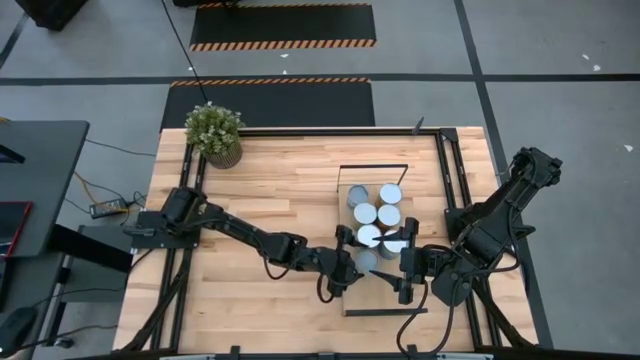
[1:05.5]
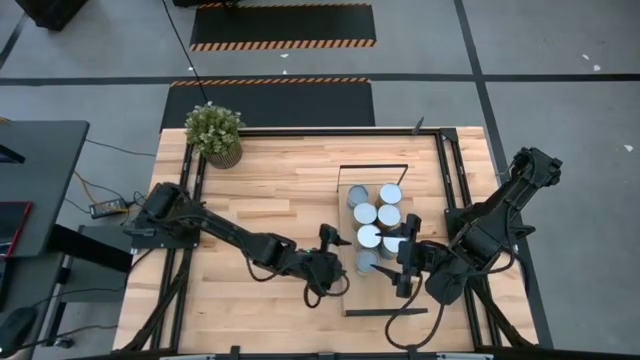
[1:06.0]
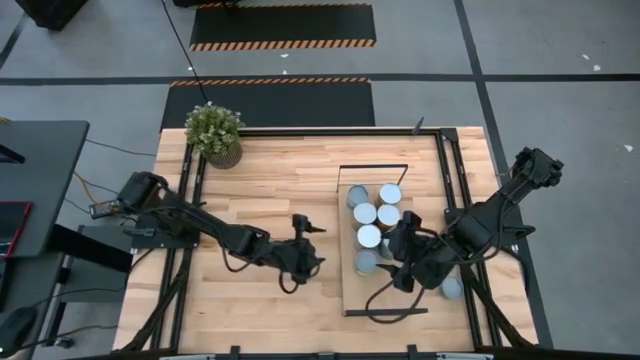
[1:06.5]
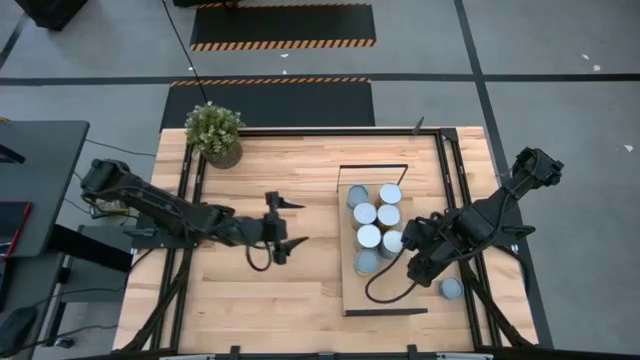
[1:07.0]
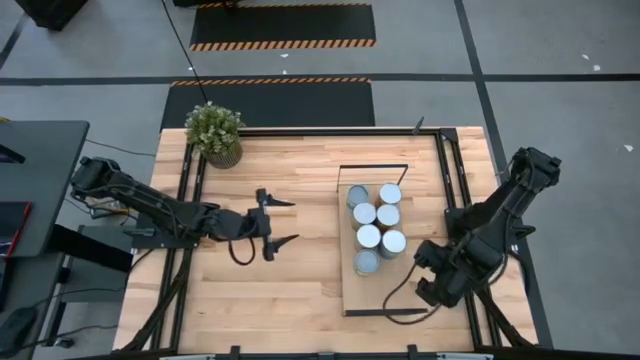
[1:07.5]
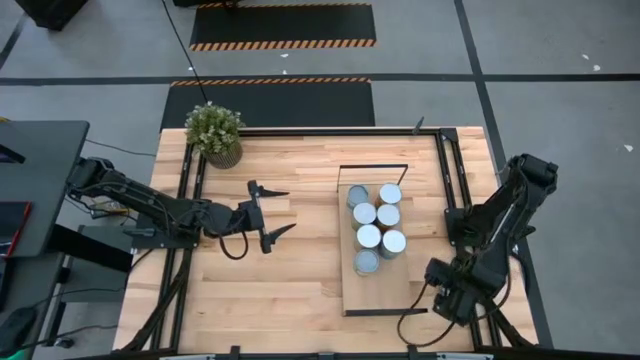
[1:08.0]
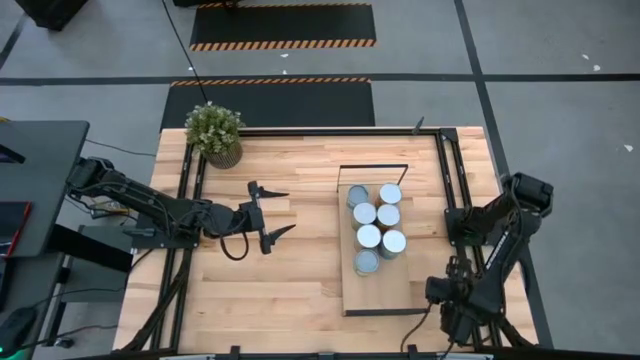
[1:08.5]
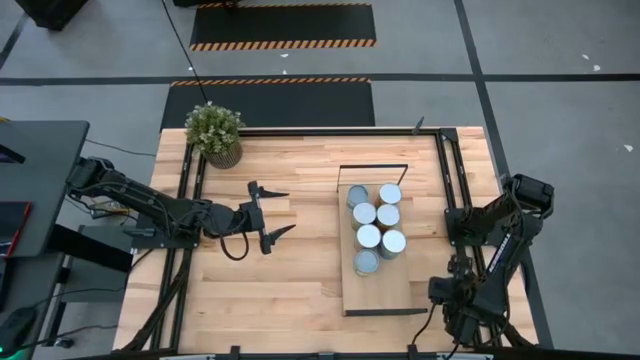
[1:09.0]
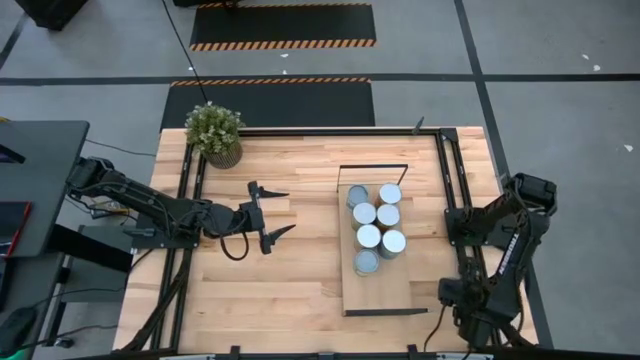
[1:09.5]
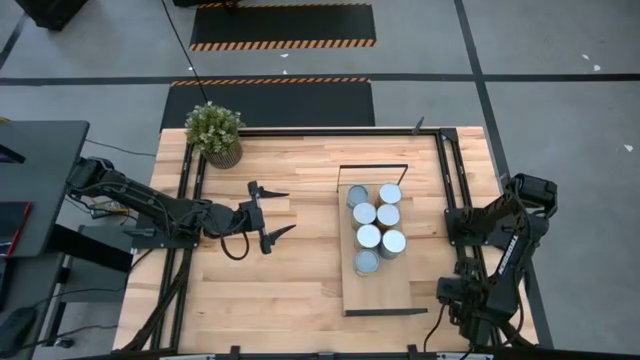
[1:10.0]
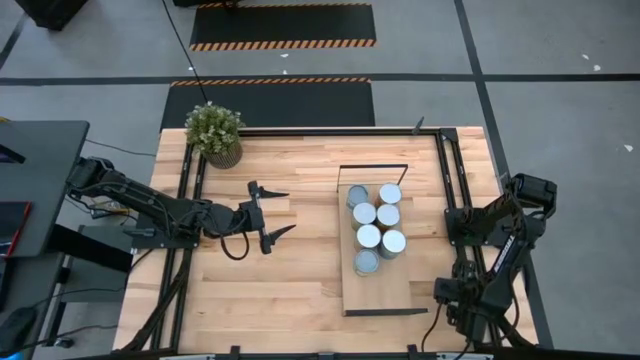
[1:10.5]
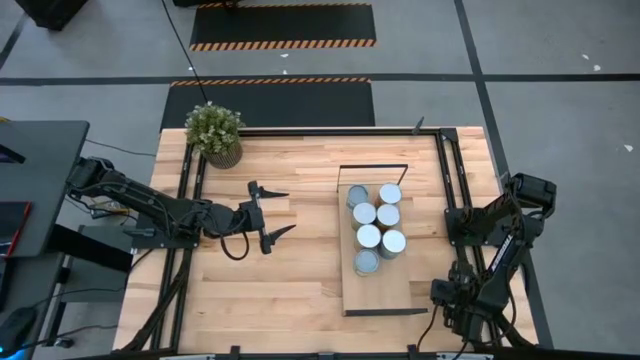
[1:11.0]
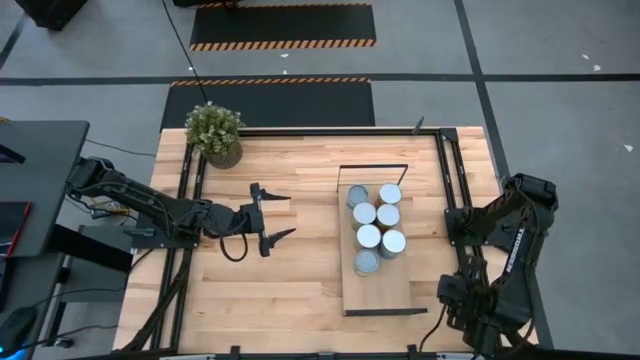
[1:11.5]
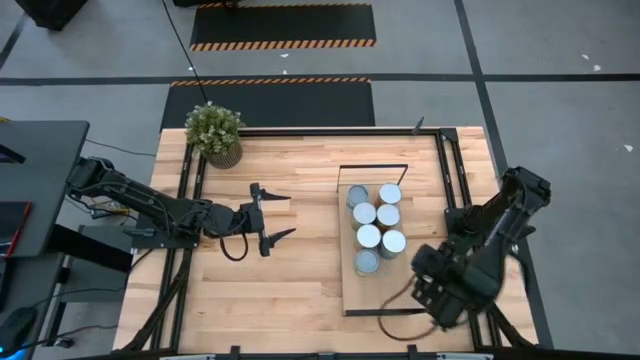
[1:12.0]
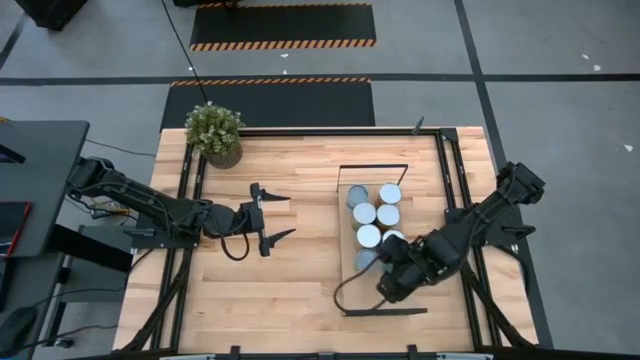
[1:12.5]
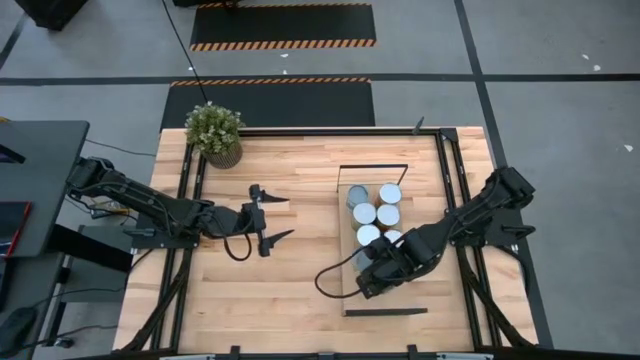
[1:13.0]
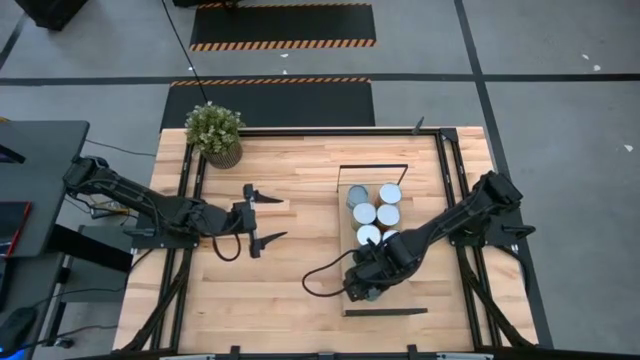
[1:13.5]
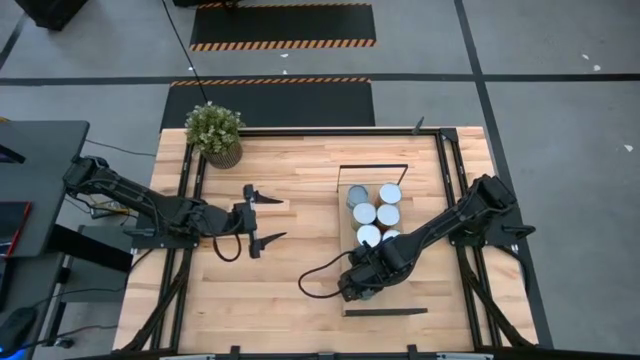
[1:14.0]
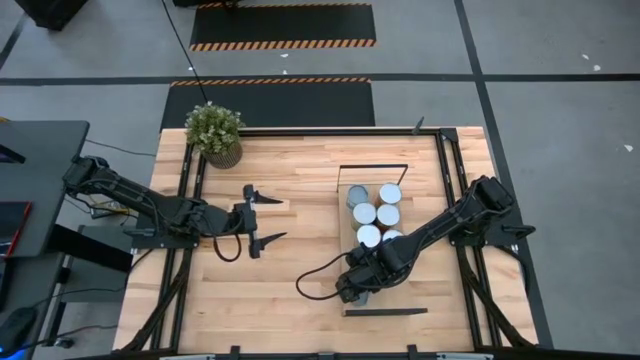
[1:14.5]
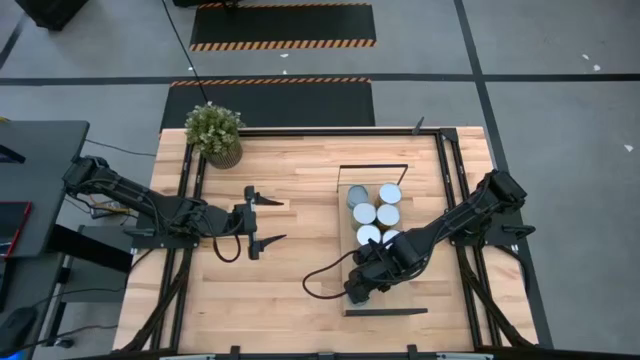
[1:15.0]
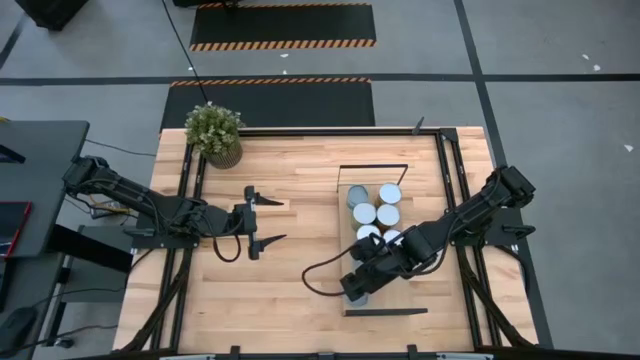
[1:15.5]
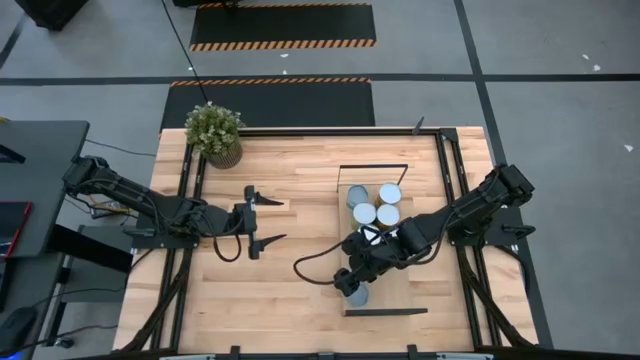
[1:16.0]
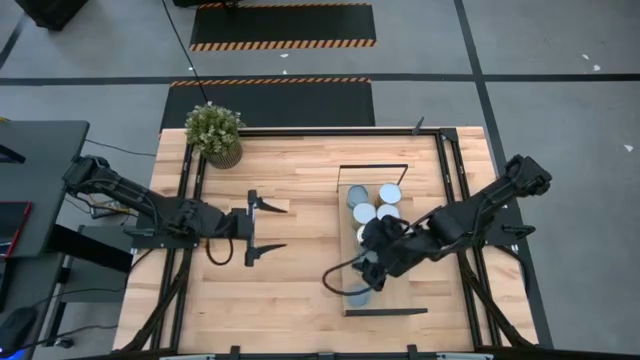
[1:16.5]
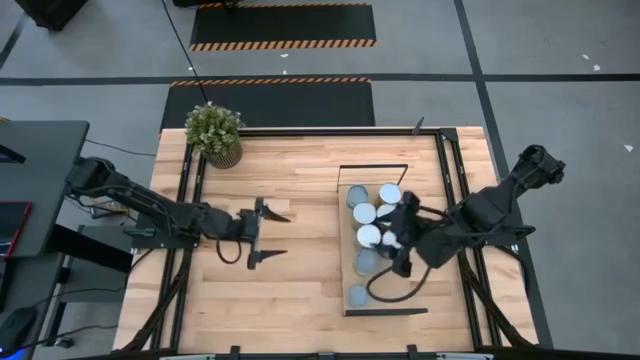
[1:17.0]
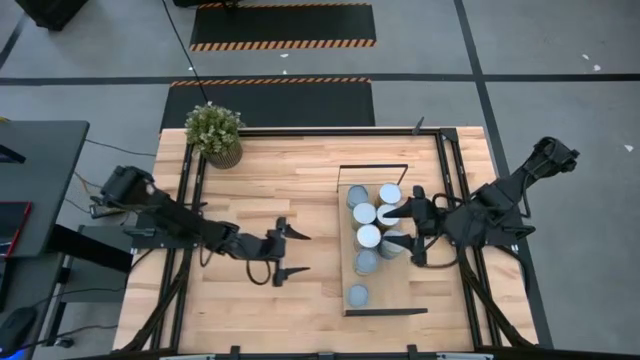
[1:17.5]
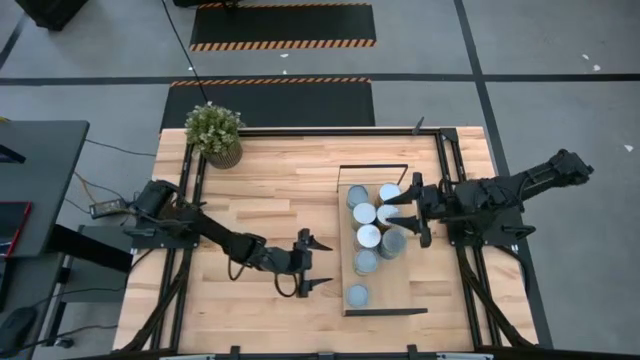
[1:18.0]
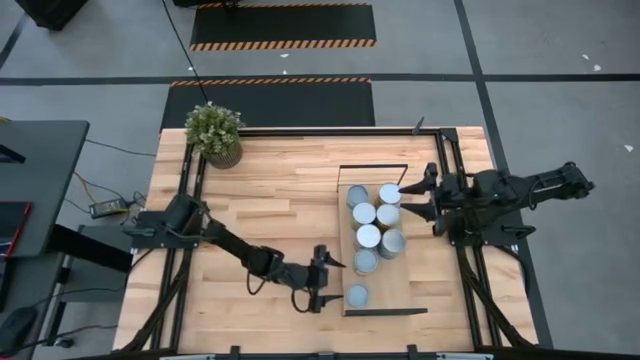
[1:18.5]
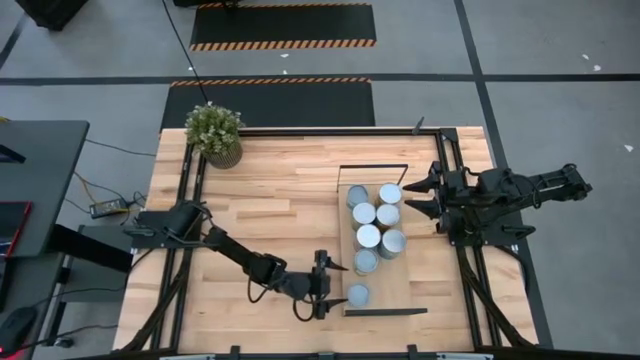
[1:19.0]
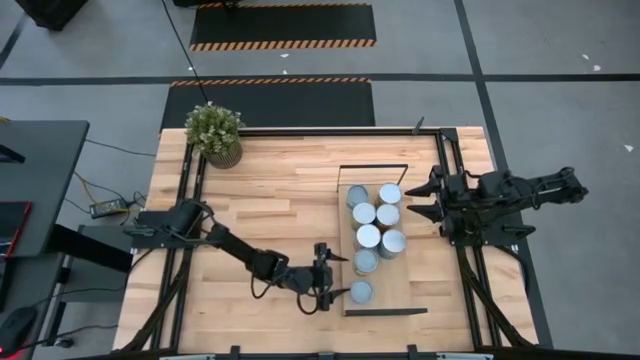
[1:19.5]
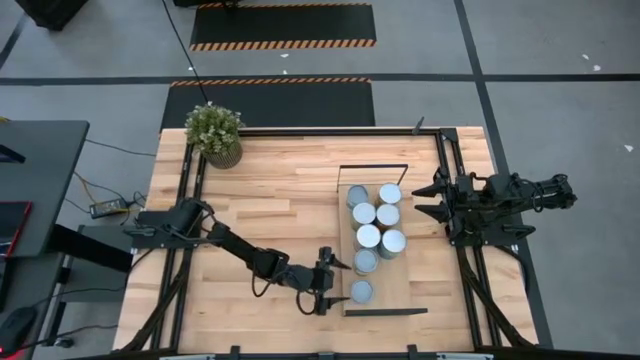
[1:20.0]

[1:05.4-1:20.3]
Task: Pick and place cans onto a shelf
Put the canned tuna can on the shelf

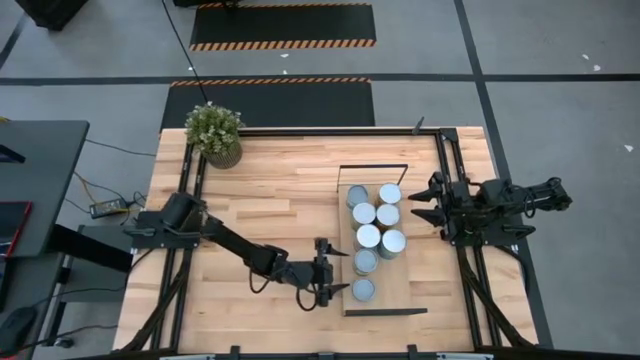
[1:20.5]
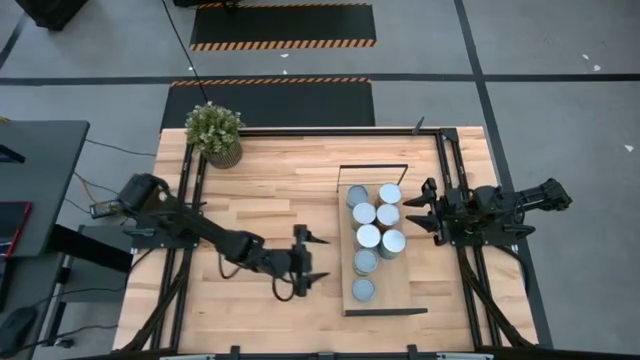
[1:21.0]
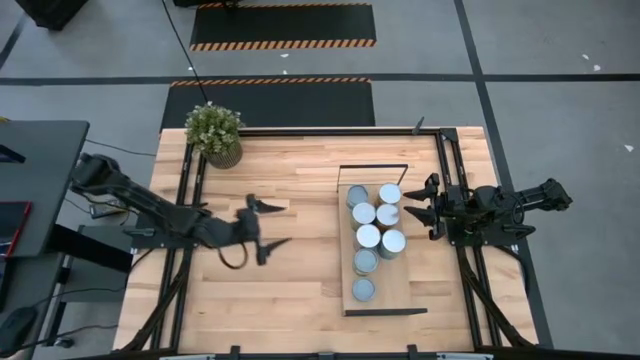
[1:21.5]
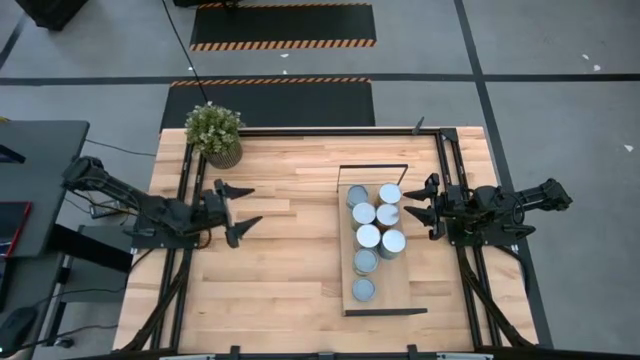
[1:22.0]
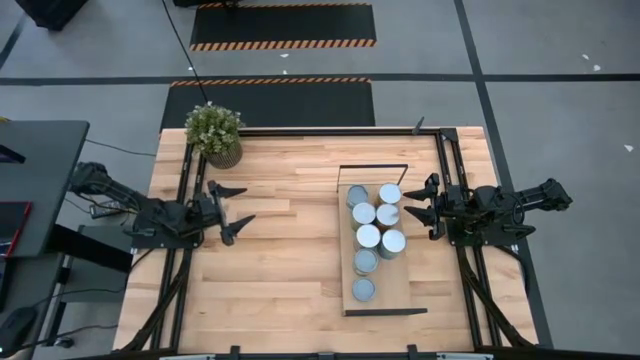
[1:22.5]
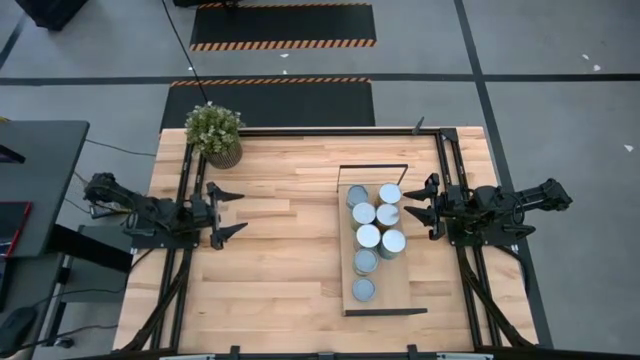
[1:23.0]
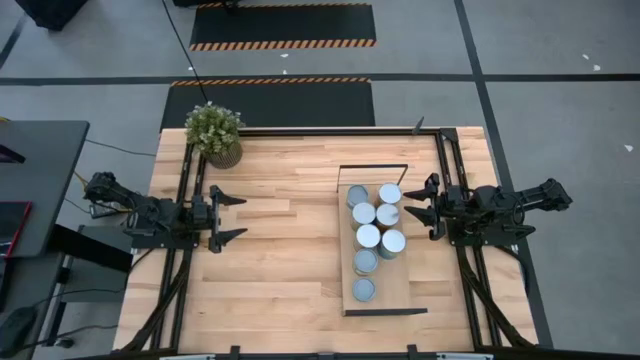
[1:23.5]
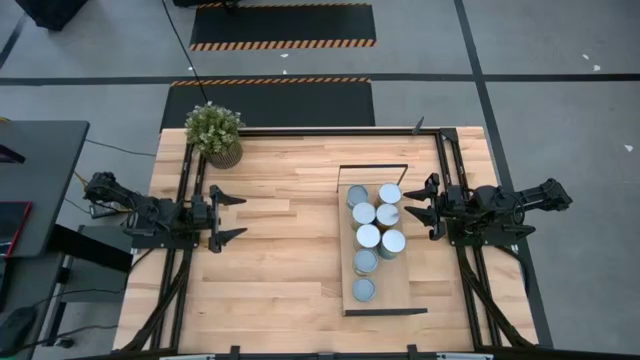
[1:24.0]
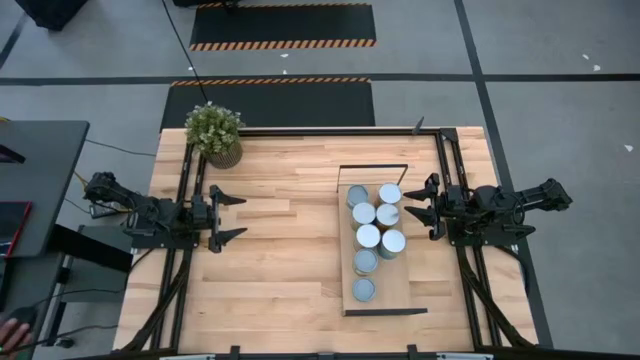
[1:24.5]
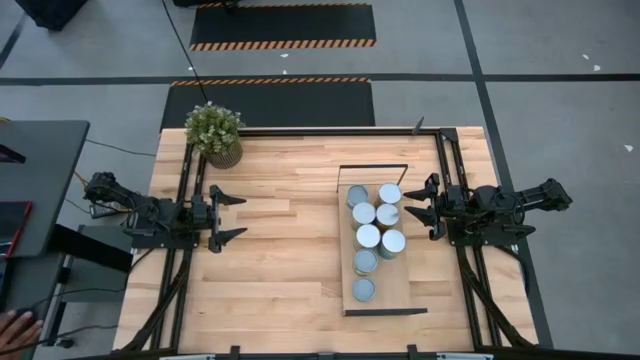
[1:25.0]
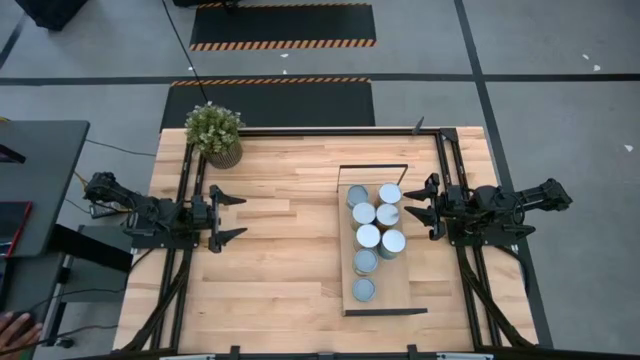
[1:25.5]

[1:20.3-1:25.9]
Return to Home Position

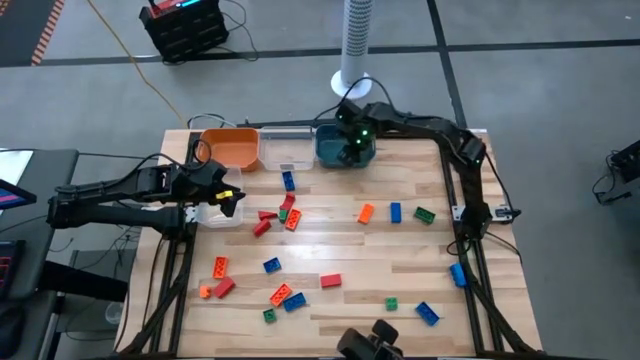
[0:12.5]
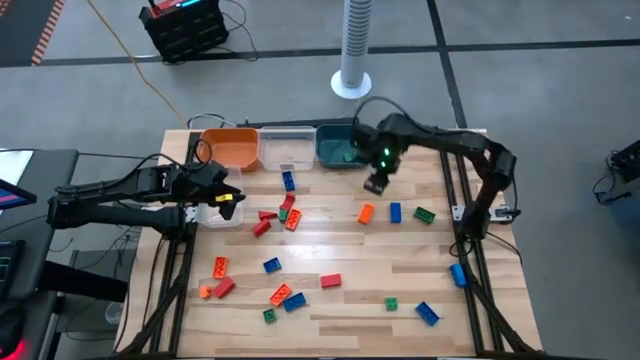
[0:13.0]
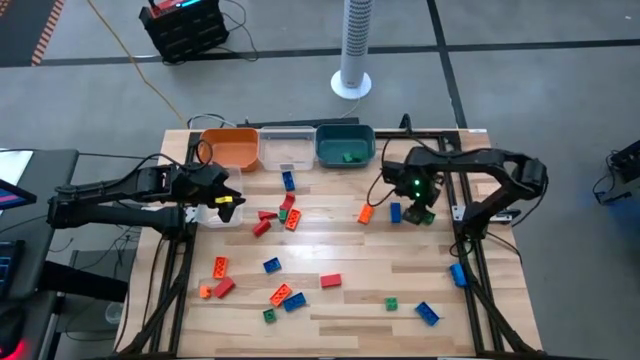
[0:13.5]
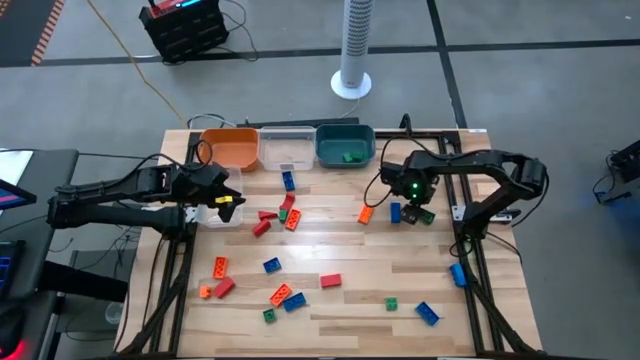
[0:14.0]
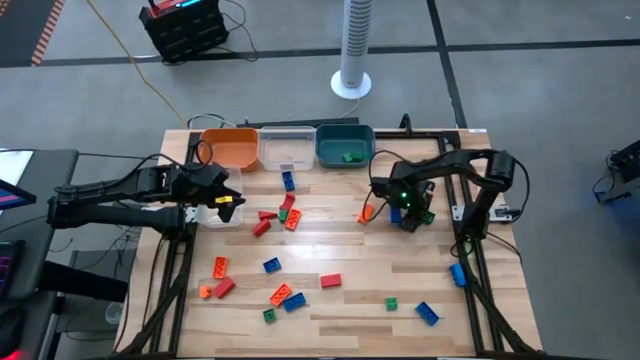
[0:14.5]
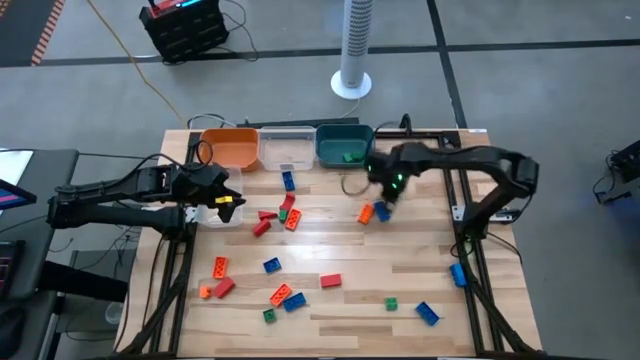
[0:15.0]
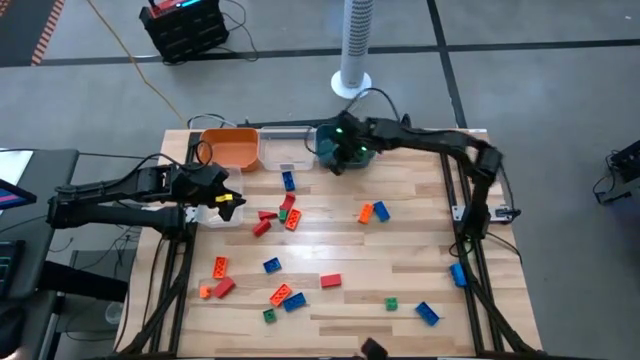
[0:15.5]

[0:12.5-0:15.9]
Task: Sort blocks
Put the green game piece into the blue bin
